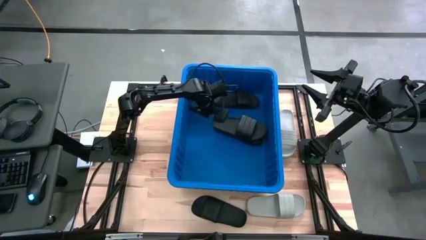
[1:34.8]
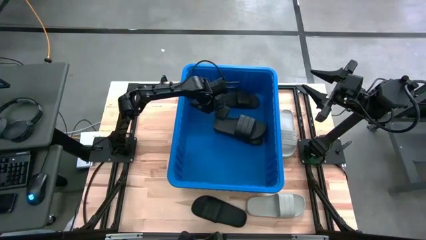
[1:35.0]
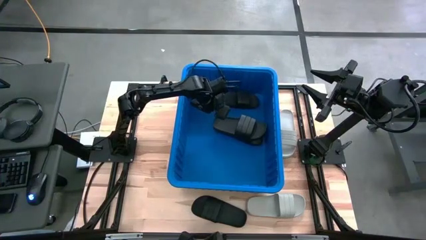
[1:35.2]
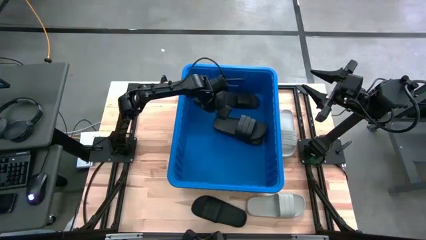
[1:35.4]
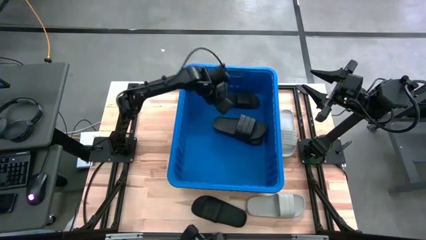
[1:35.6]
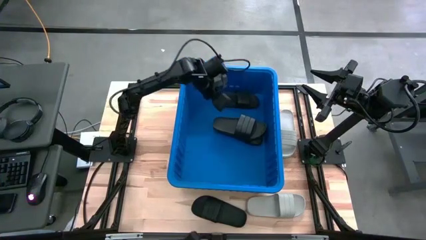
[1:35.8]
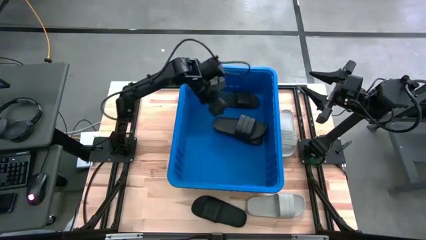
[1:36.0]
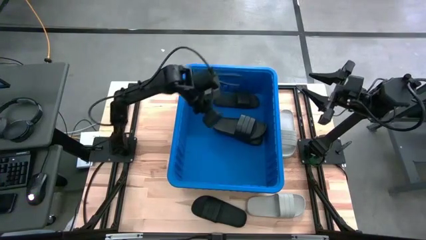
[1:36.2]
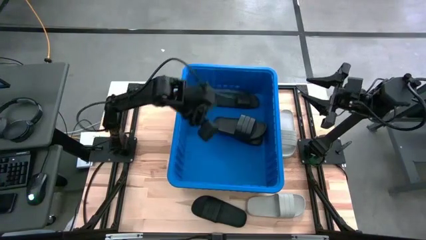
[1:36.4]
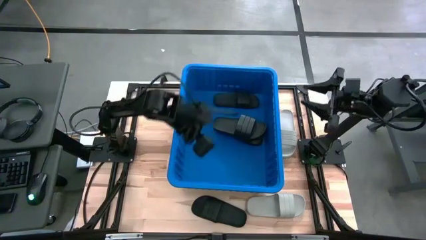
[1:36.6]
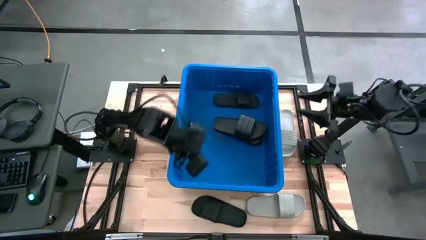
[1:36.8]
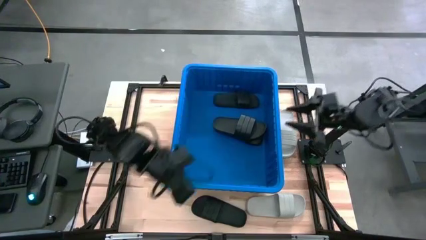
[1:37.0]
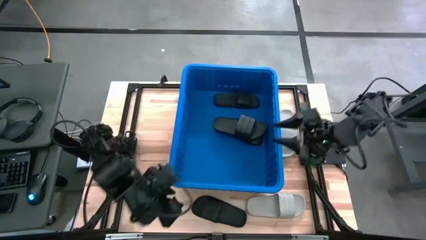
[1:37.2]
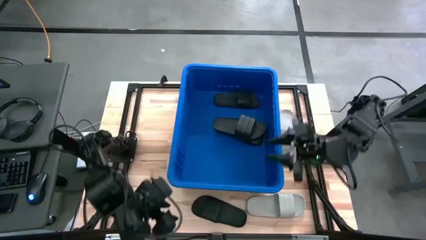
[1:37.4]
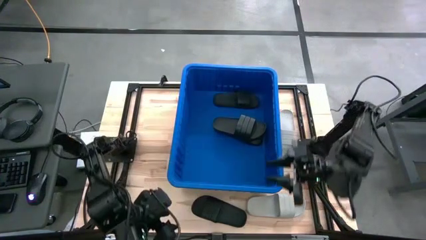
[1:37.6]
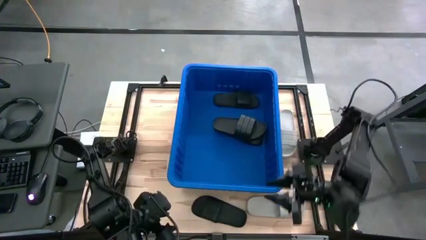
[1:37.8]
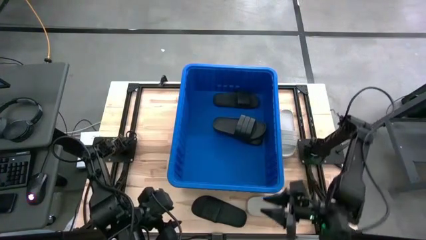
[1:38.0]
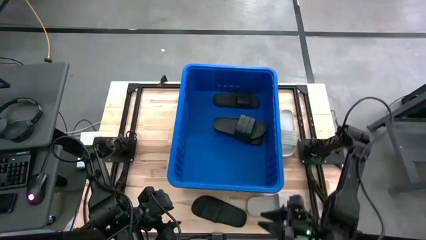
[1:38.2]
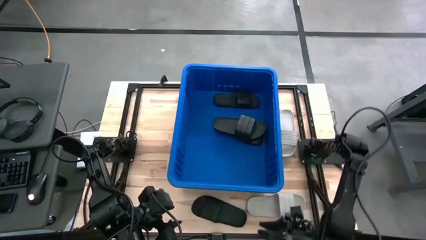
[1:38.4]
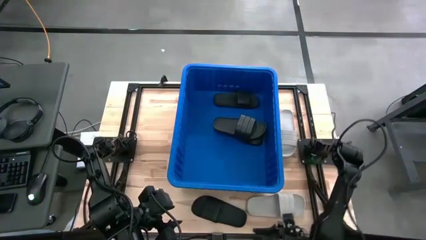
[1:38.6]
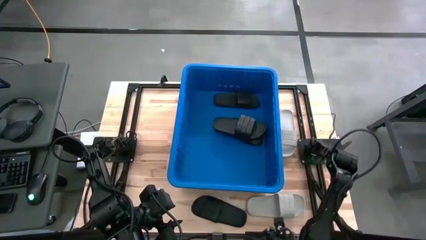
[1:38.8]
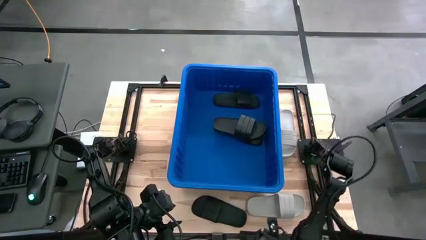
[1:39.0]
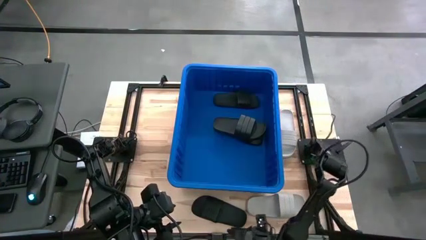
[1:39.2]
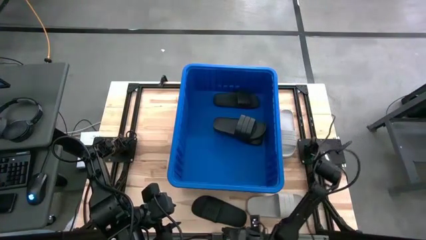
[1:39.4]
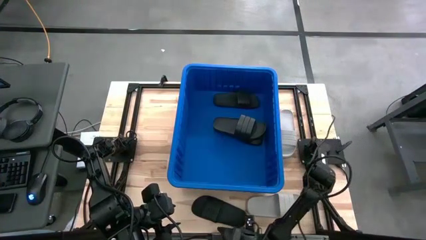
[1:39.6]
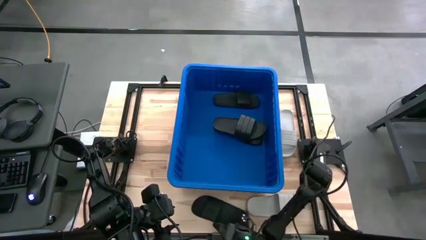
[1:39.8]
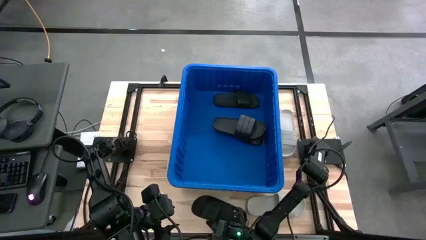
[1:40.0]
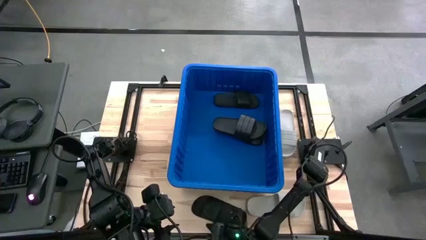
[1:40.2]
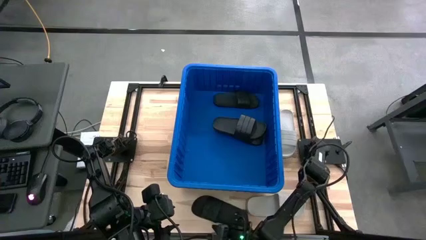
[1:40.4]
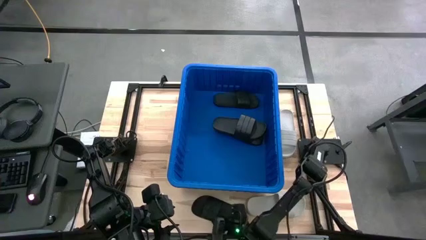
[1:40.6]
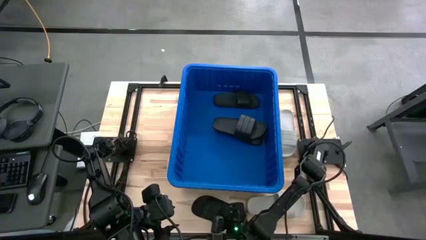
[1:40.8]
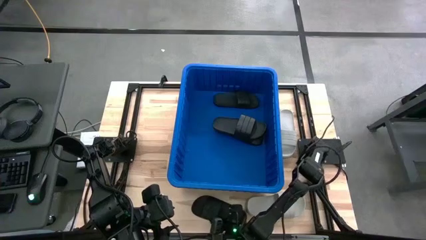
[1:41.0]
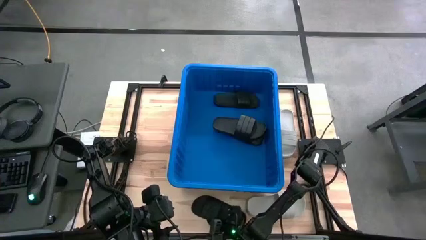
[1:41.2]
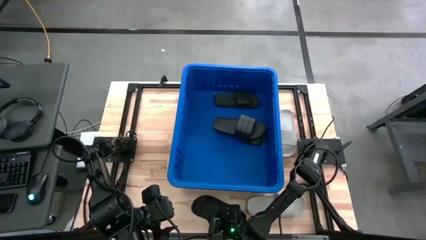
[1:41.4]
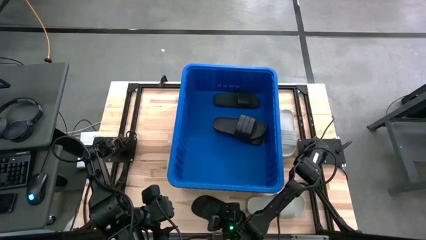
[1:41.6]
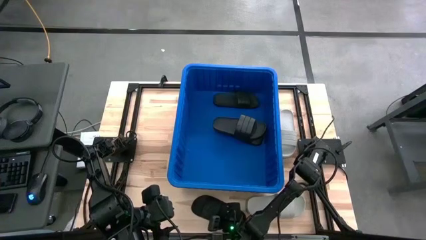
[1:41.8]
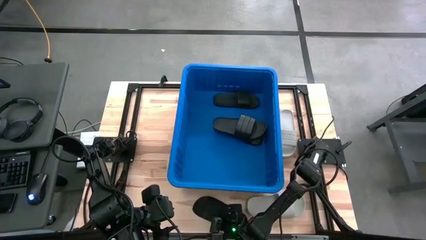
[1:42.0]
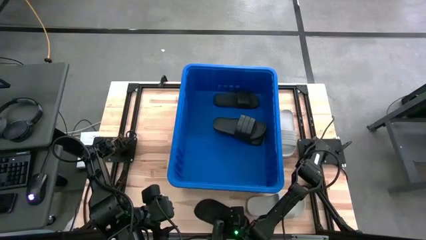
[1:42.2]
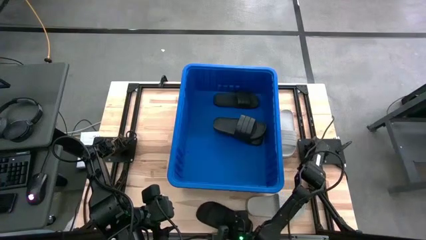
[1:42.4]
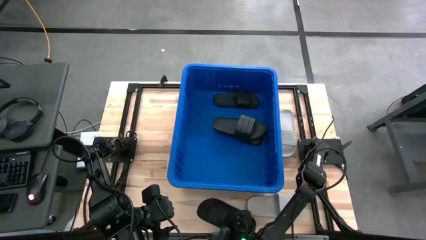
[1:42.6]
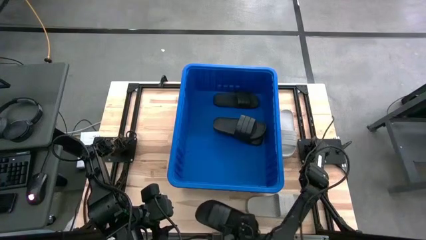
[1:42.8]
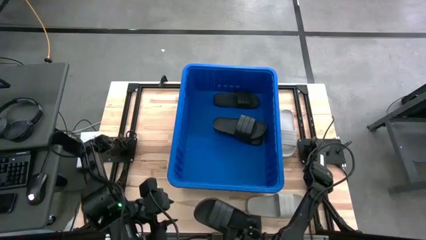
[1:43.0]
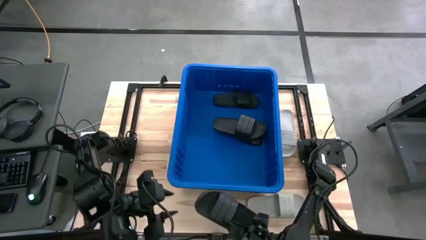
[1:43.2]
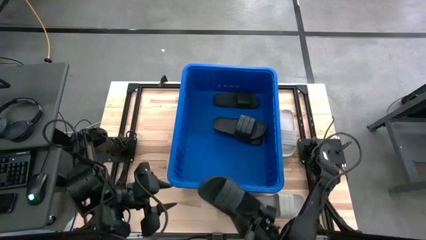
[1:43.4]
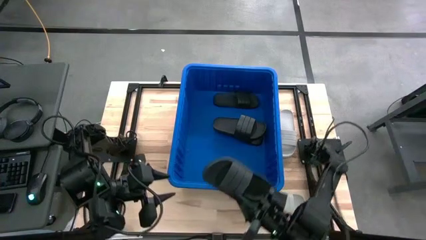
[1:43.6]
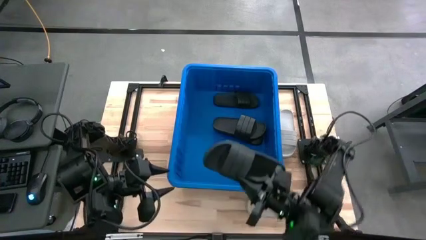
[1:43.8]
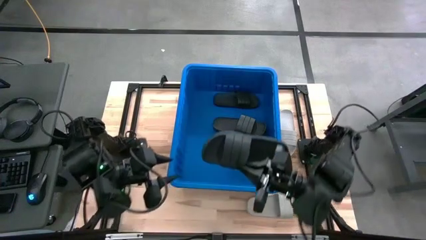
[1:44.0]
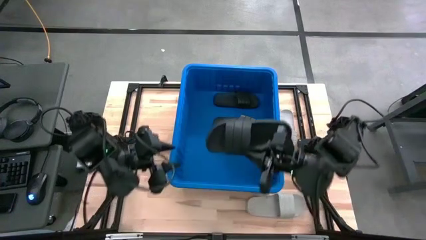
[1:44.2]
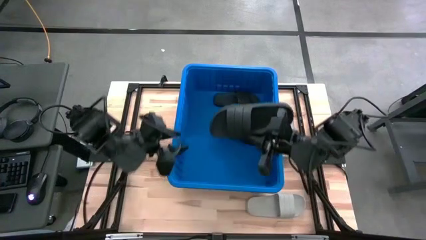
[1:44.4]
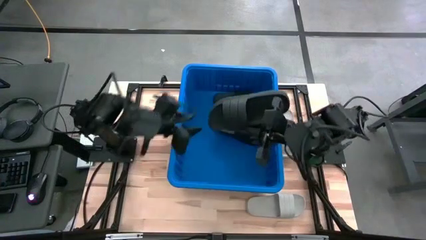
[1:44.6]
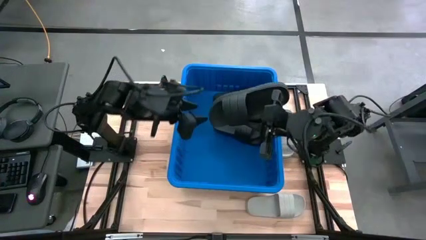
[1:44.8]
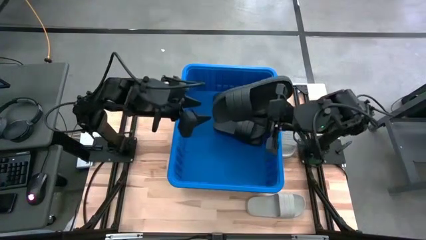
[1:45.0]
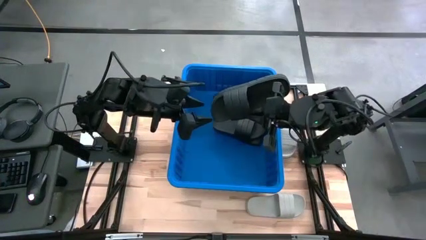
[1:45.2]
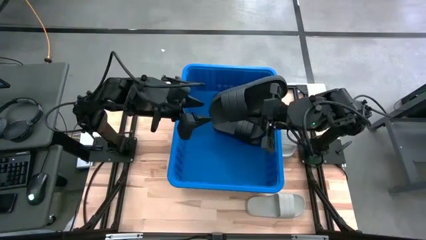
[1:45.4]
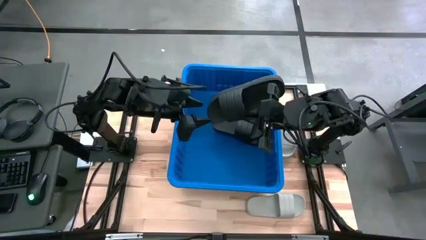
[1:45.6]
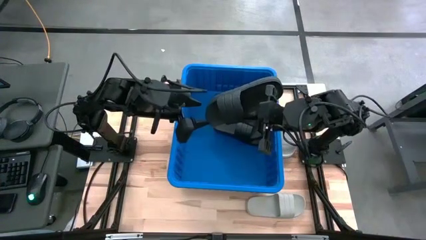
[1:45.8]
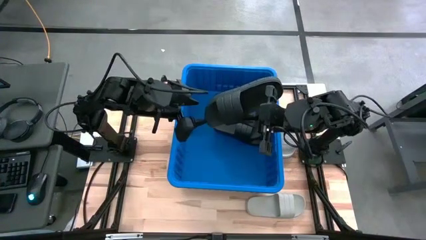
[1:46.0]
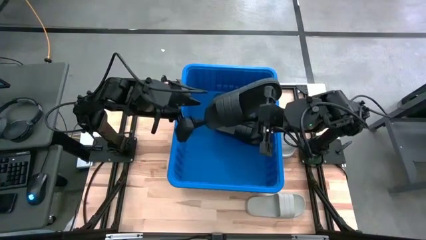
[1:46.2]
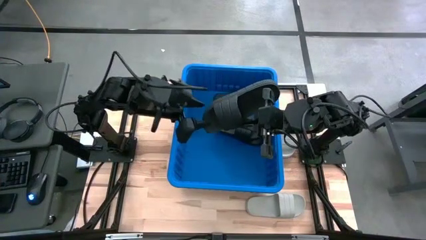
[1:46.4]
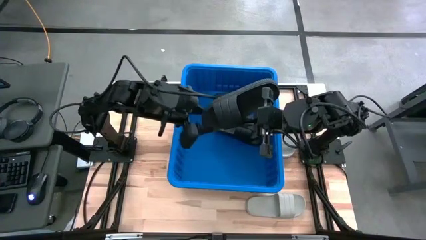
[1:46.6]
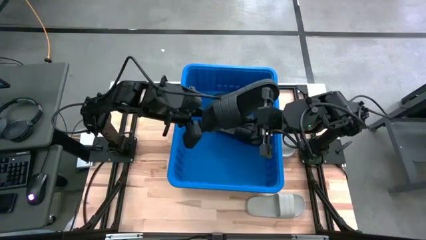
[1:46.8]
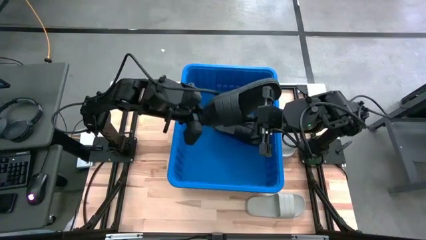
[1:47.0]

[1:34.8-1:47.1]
Task: Pick and place slides into bin
Stack the black slipper on the top black slipper in the blue bin

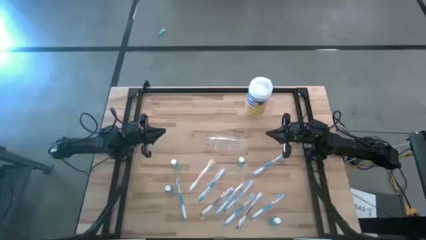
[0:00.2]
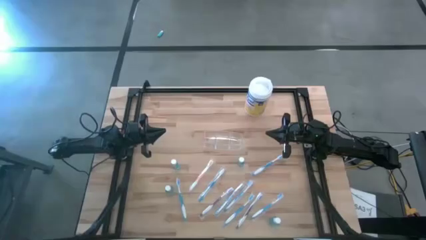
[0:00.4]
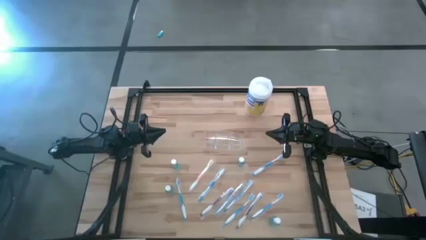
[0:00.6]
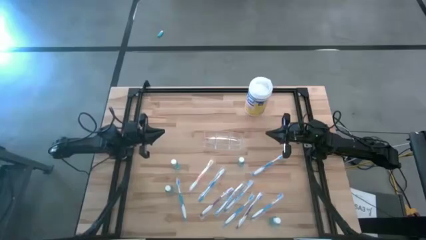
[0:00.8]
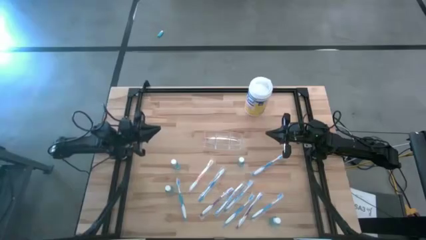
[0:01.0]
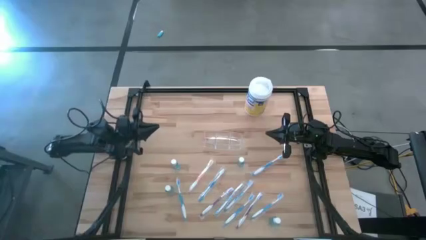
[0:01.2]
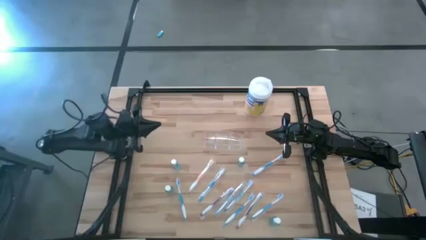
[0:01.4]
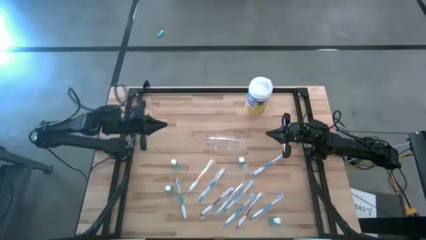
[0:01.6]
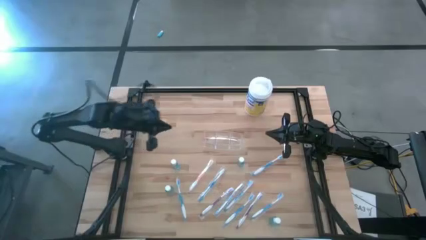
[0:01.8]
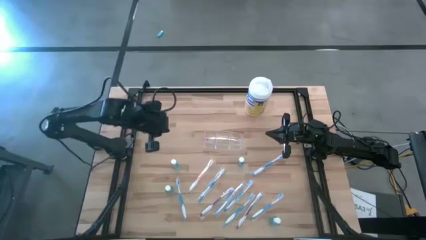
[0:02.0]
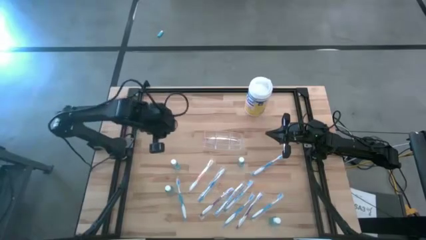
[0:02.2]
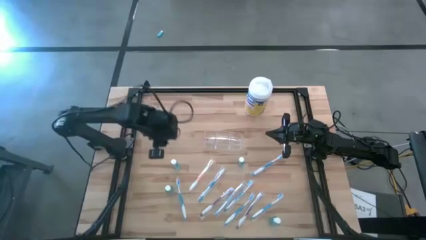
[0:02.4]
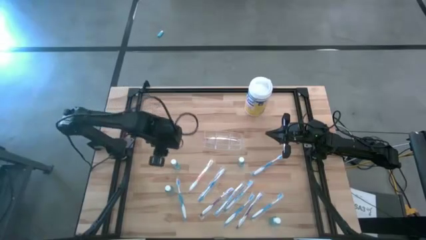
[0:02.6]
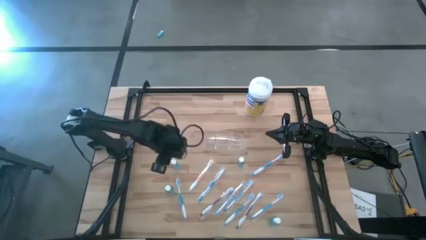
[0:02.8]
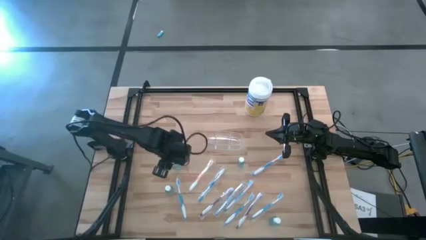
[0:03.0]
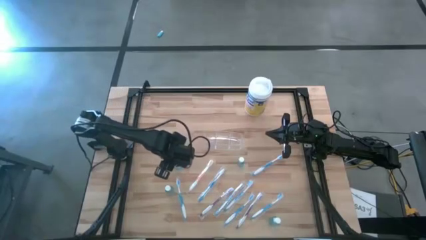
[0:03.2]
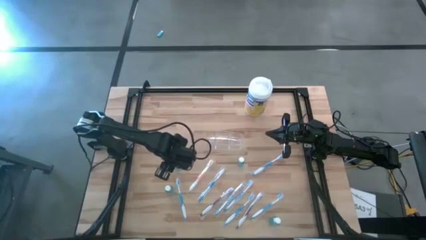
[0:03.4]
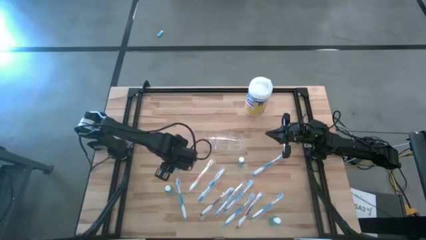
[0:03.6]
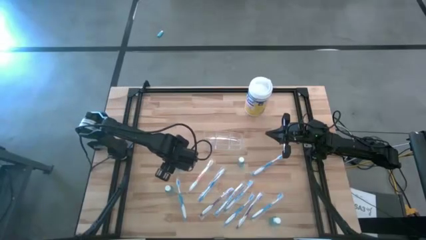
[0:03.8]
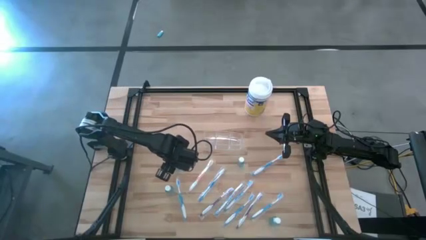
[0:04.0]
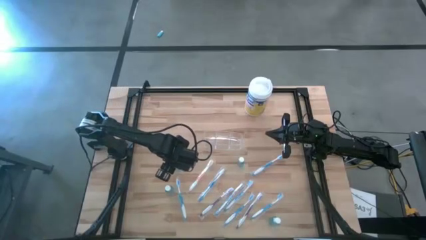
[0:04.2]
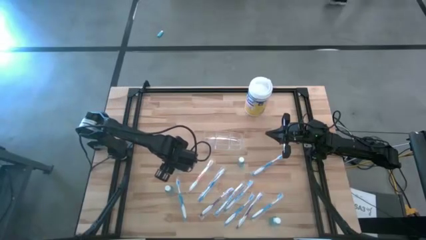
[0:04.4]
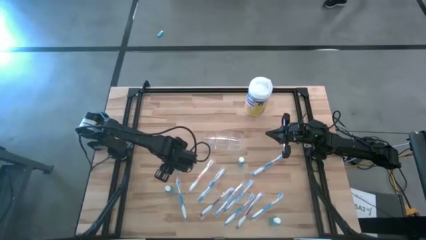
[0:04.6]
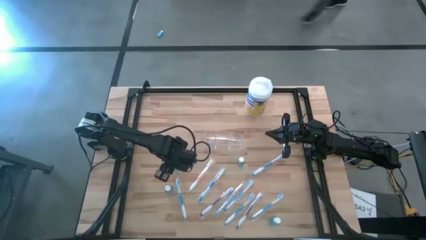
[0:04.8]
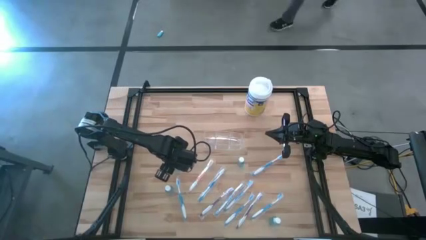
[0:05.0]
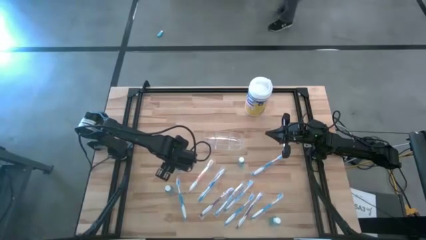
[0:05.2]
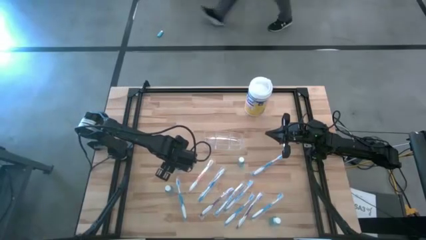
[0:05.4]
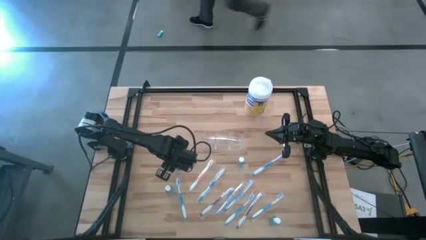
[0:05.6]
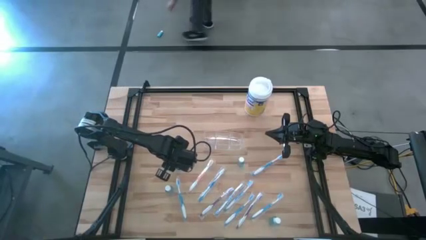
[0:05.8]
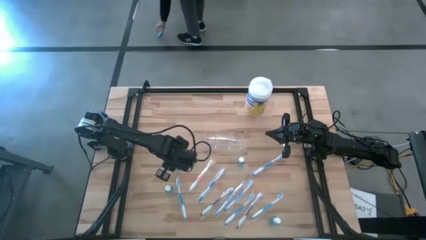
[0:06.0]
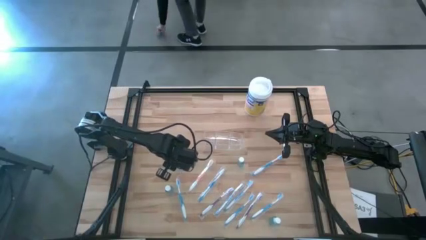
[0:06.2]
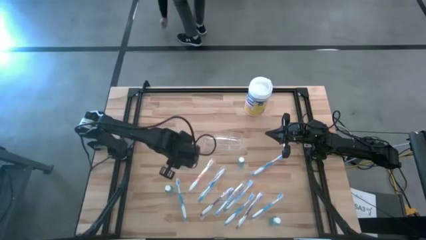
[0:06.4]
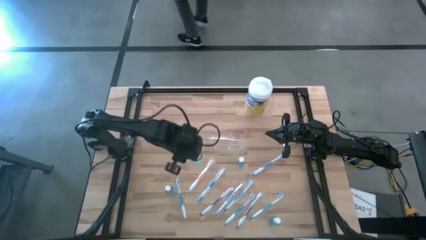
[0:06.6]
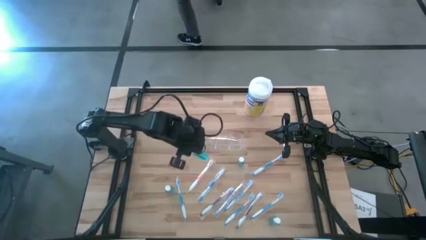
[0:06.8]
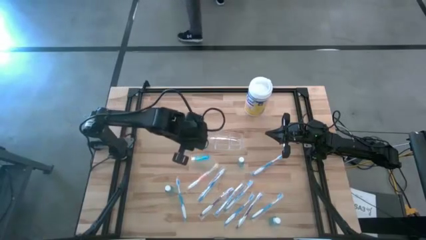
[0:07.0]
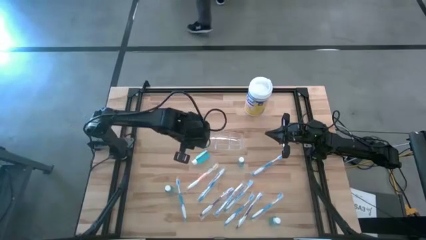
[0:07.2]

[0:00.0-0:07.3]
Task: Pick & Place toothbrushing station
Put the blue mouthwash into the transparent organizer
